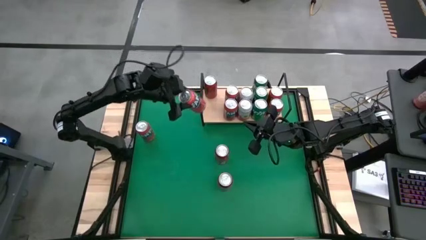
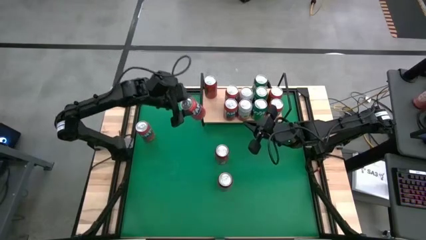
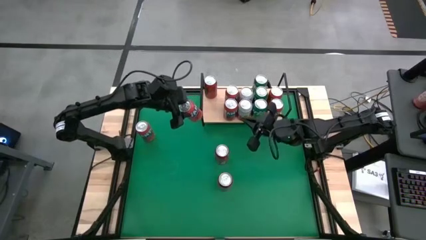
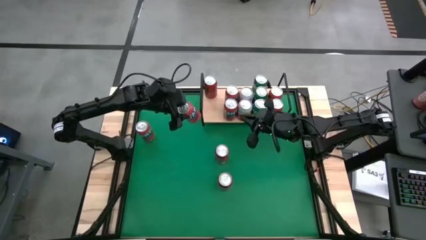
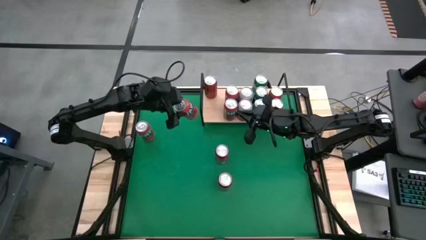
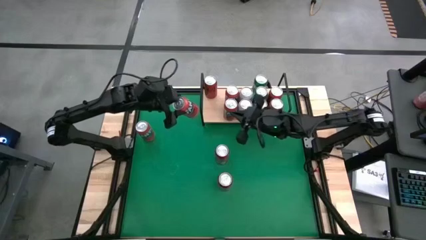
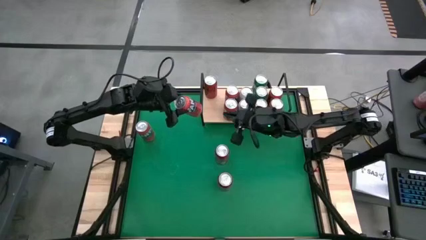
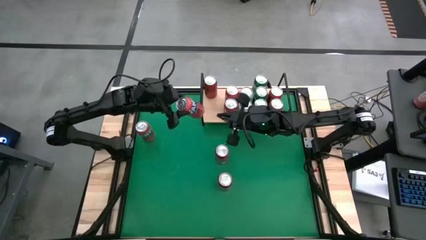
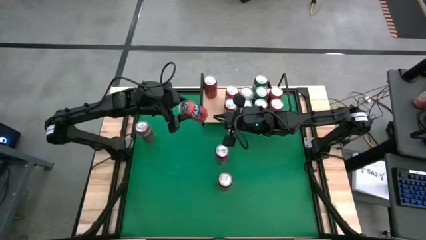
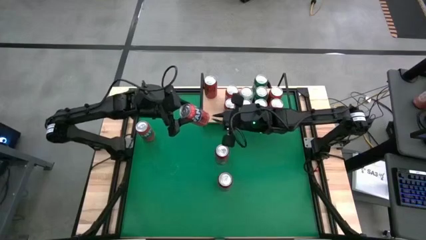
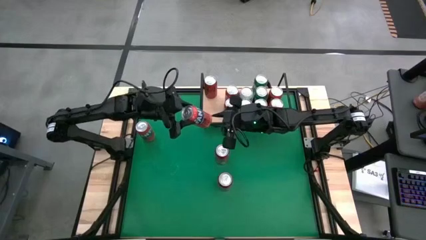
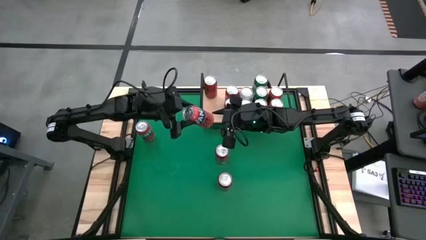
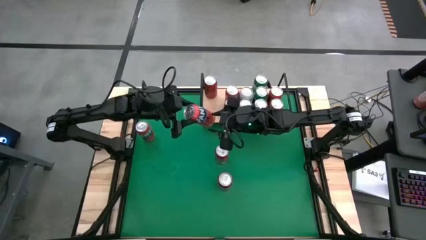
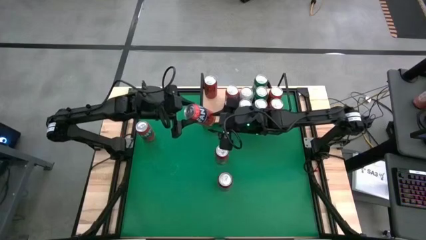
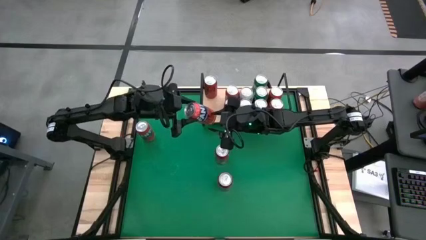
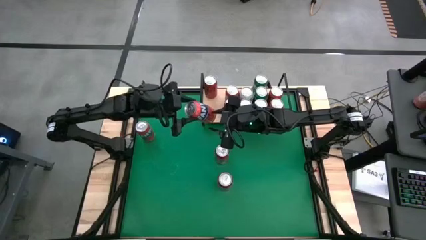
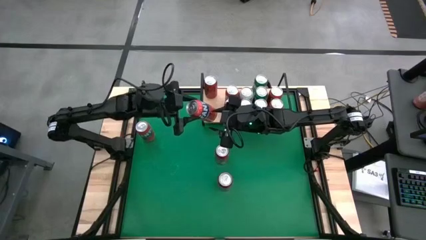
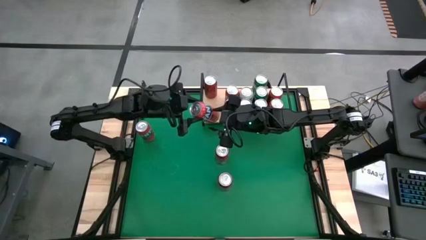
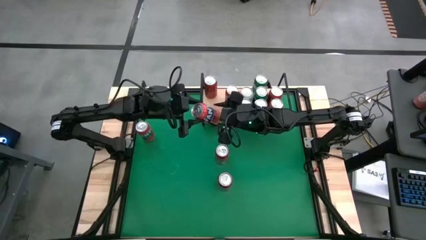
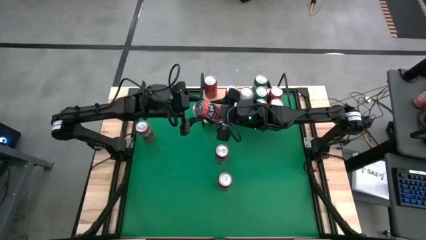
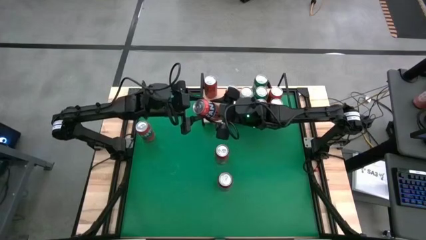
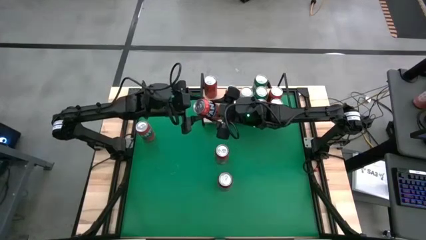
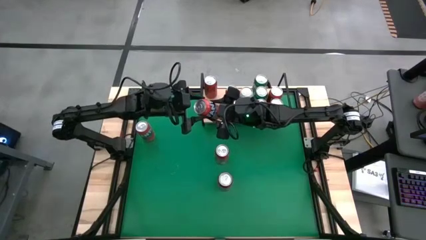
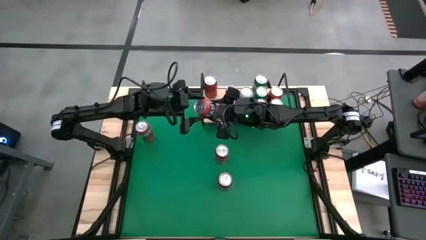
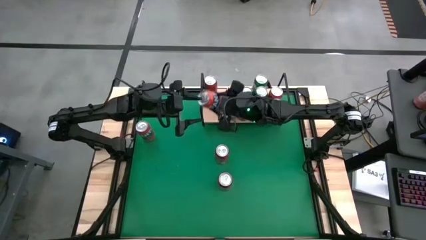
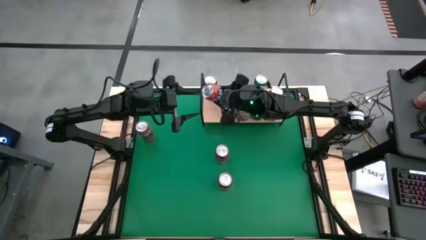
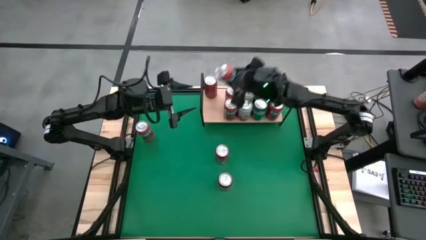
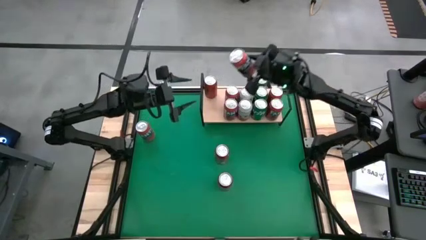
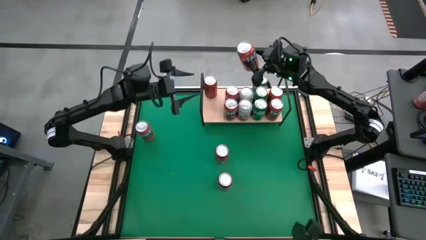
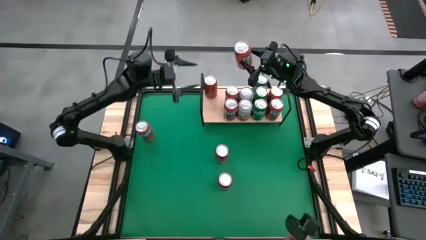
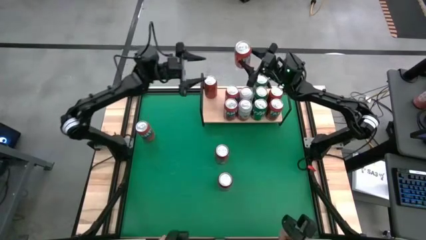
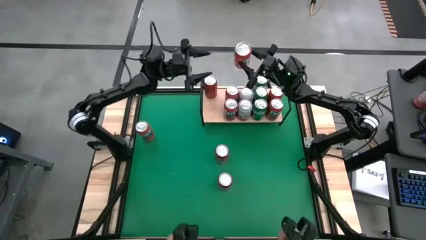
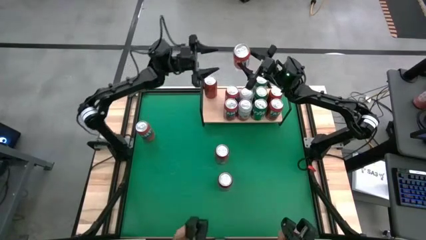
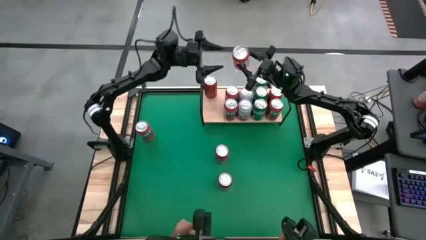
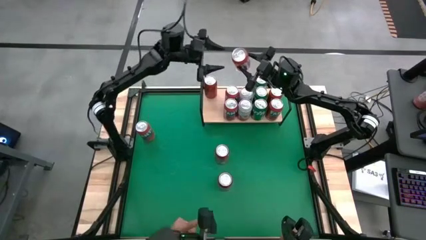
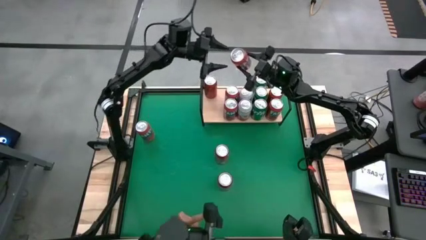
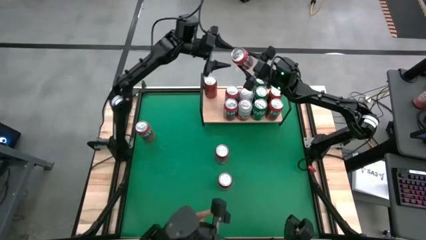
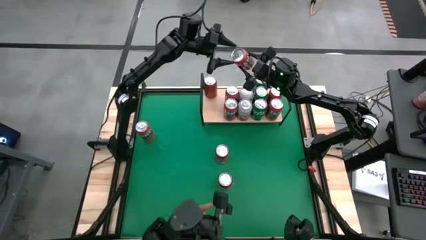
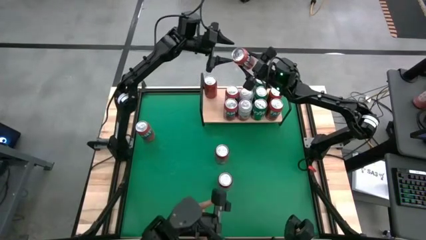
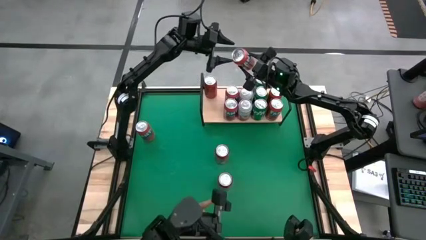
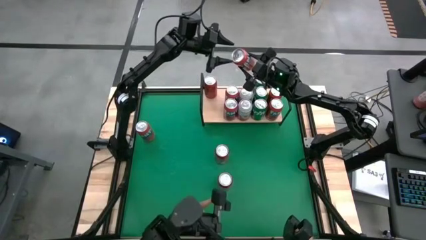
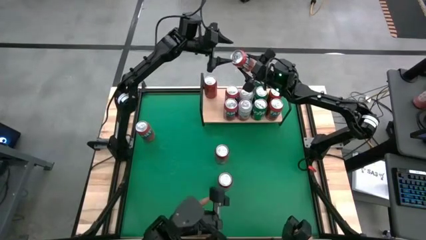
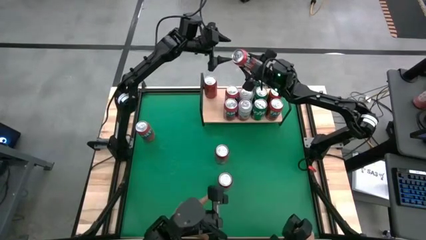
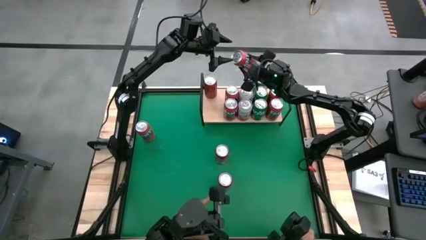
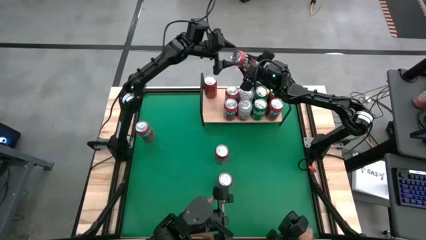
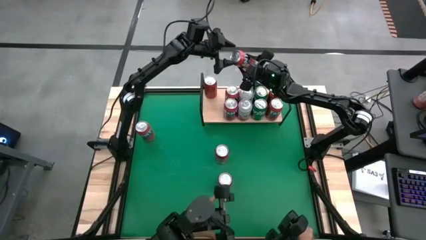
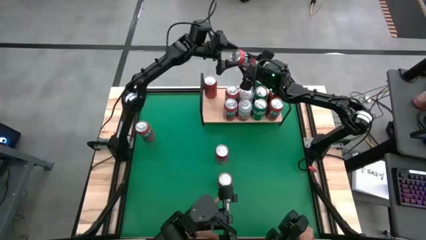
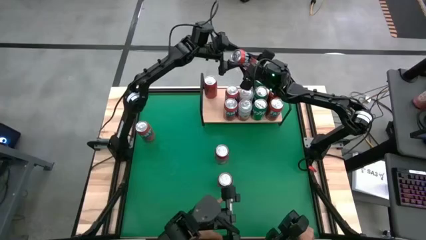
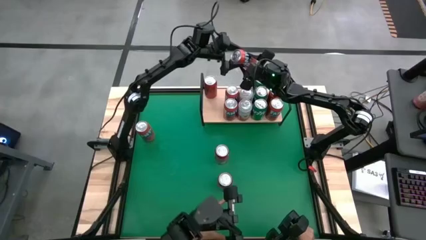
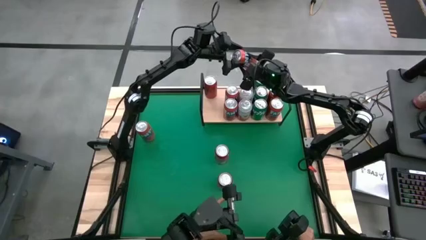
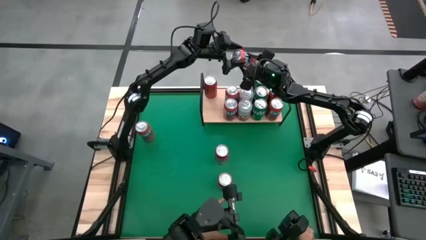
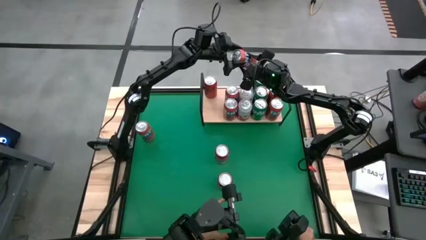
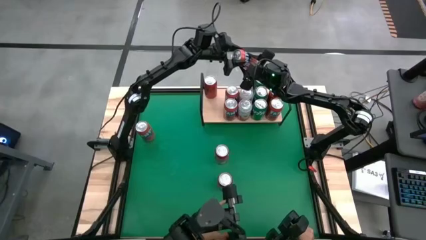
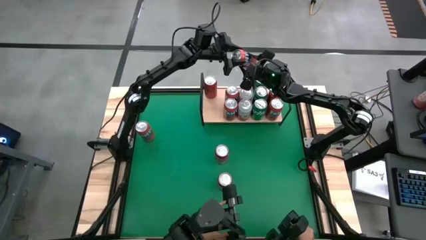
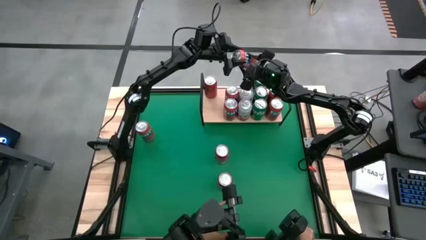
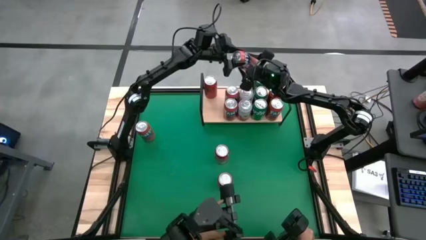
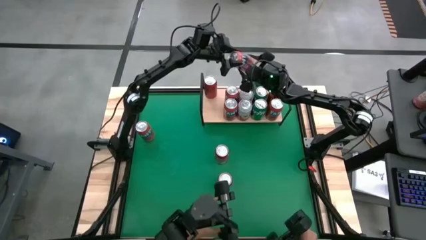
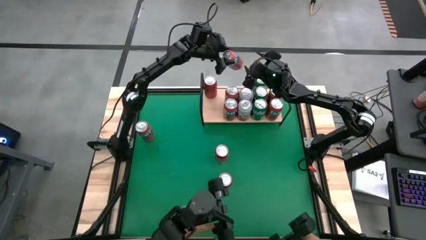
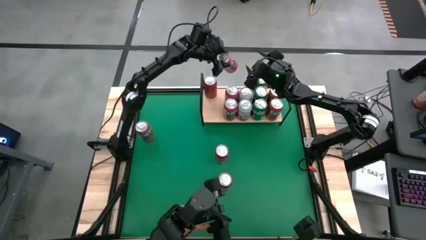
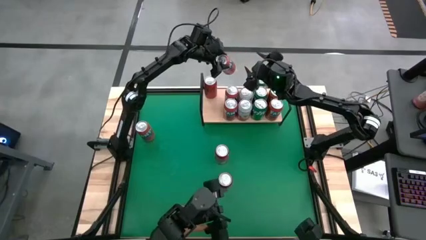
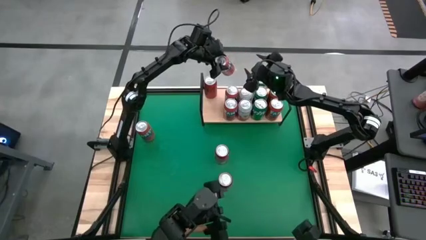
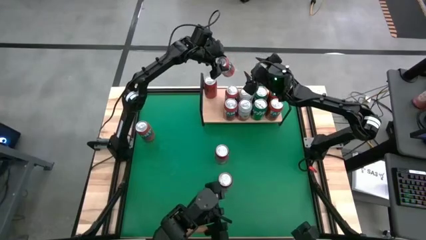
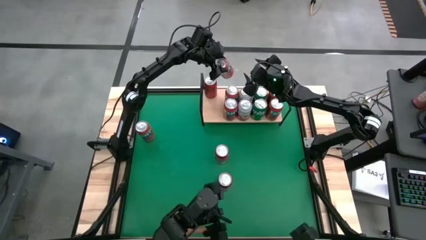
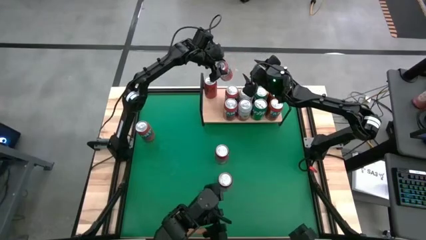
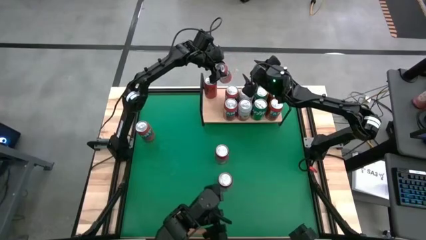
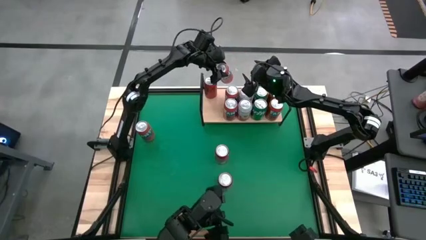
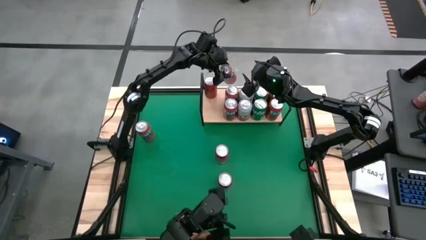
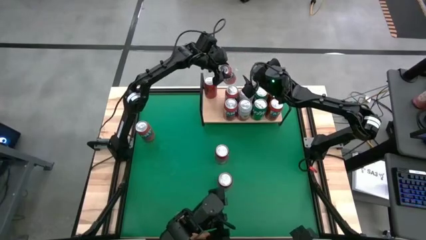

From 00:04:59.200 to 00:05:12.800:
Task: Place canned beverage on shelf
Put the red soda can on the shelf aligned with the other red soda can
